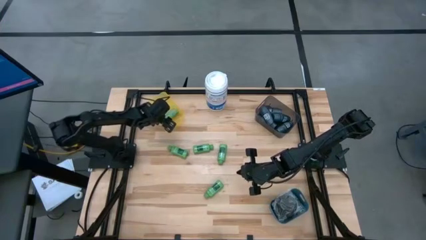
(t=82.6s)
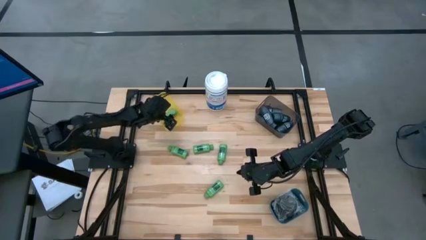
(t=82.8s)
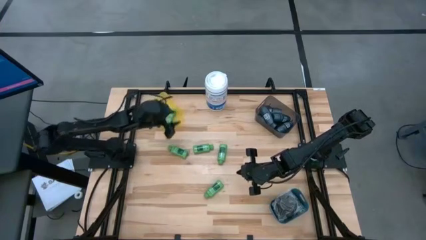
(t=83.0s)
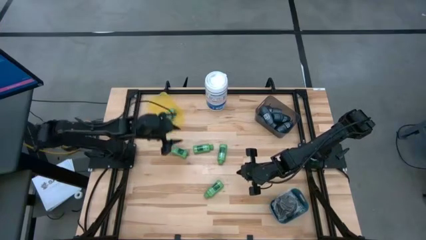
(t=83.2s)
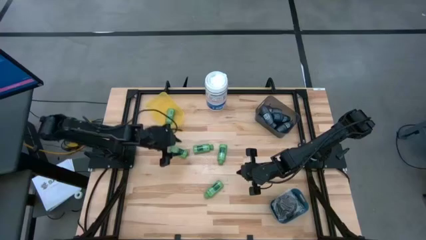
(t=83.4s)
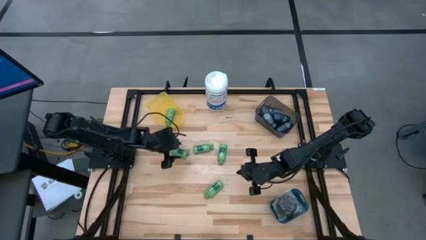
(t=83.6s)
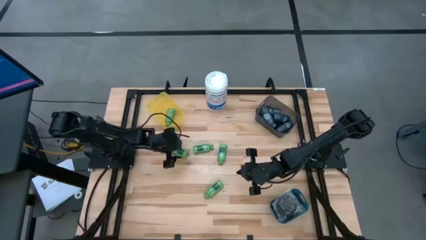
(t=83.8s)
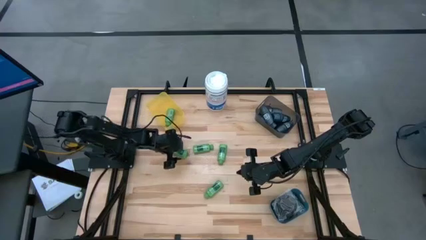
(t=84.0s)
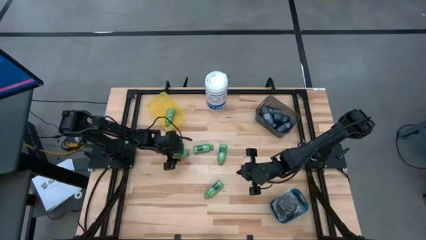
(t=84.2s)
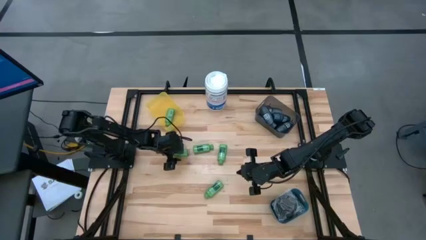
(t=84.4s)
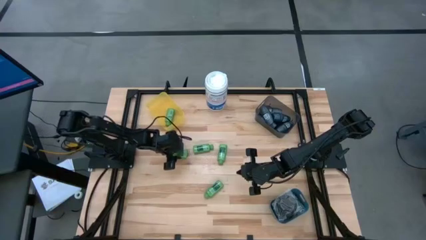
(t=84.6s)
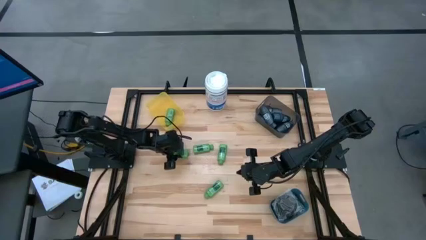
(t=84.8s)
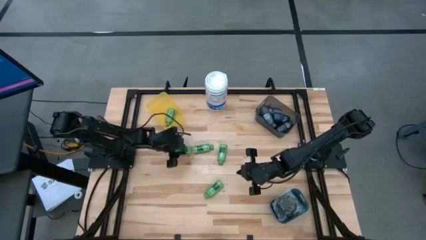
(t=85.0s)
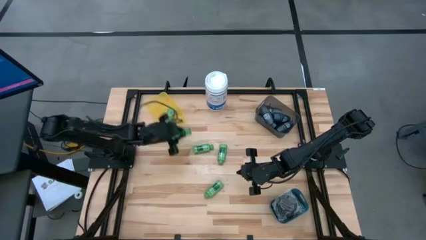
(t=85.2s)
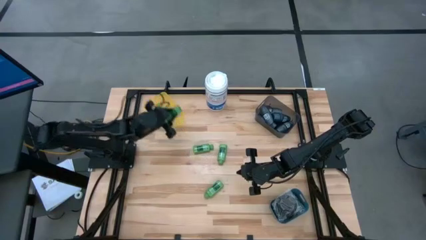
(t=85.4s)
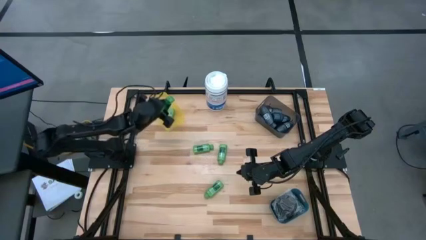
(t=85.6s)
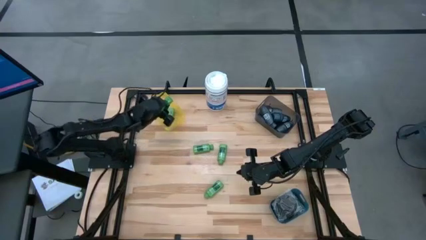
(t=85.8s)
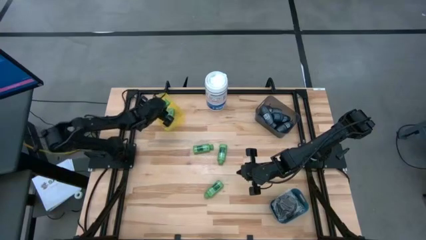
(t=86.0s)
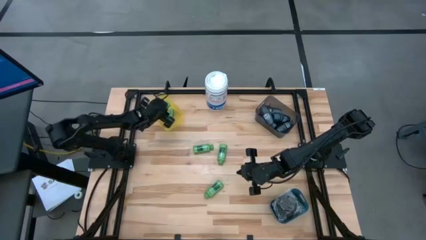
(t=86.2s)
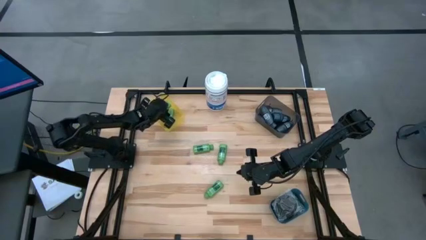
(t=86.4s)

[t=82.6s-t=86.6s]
Task: Pick & Place Travel size toiletries
Put the green shampoo into the yellow bin

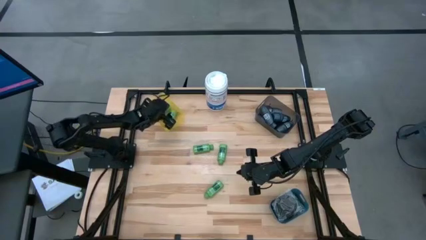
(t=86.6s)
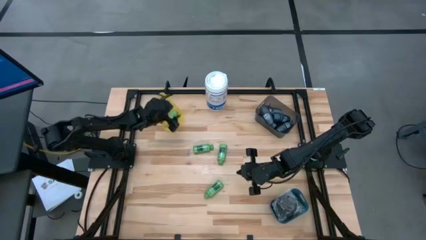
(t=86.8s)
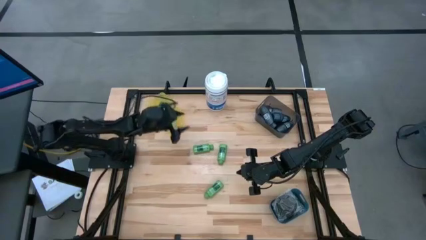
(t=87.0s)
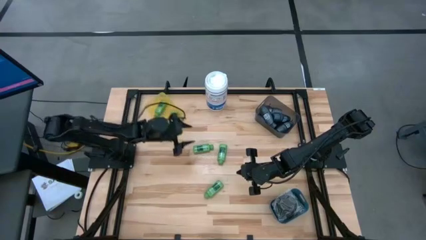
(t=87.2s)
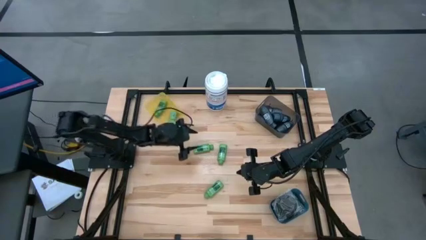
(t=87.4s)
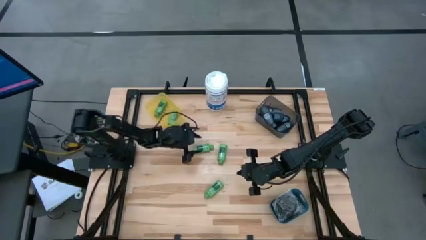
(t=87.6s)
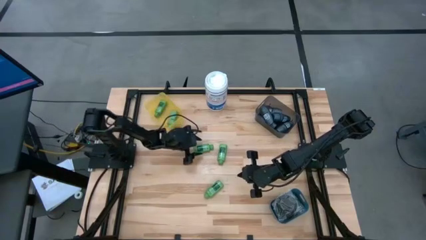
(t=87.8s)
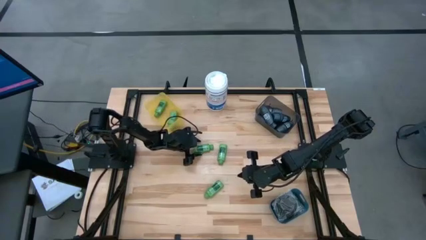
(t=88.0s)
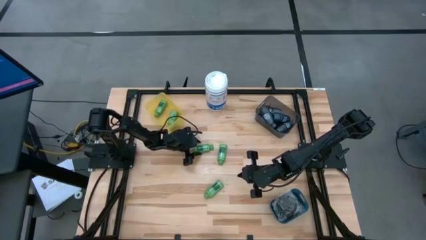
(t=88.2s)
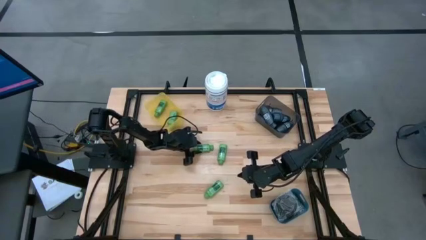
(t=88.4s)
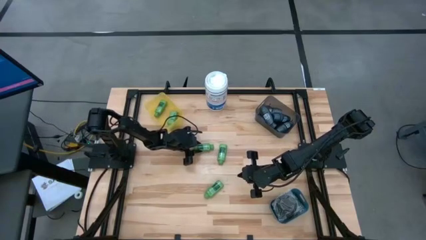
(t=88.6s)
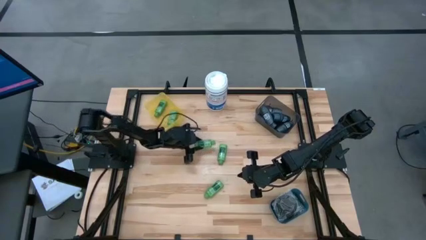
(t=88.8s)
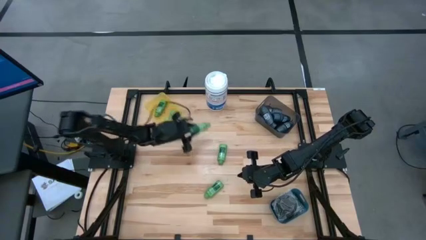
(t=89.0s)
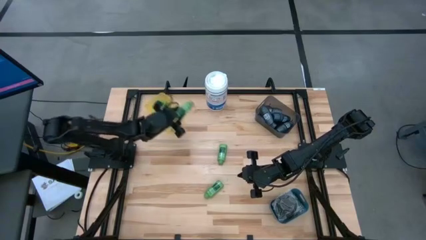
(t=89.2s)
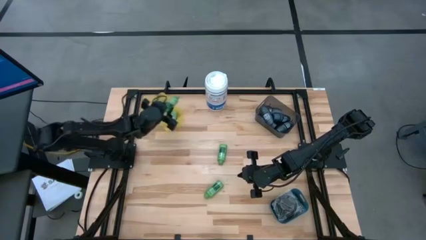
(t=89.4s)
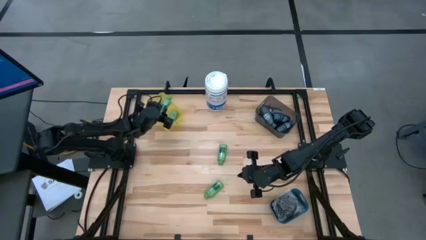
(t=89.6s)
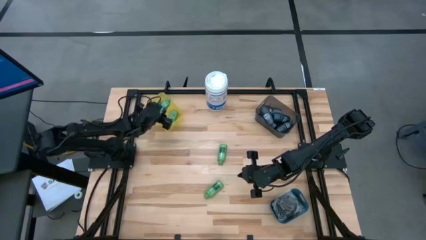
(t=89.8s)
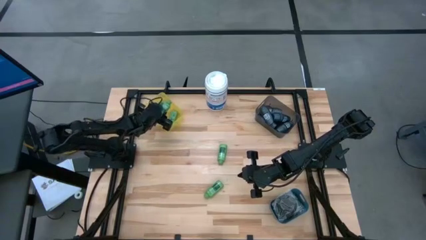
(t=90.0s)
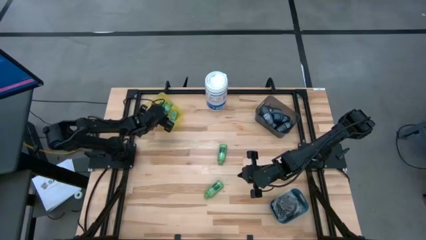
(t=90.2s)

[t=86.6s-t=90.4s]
Put the green shampoo into the yellow bin

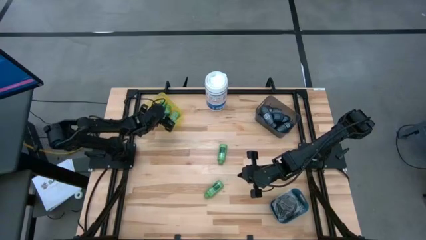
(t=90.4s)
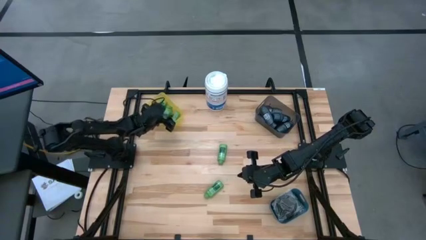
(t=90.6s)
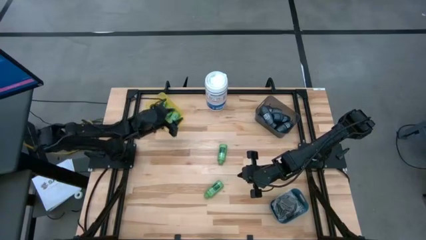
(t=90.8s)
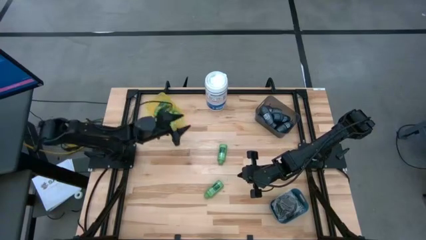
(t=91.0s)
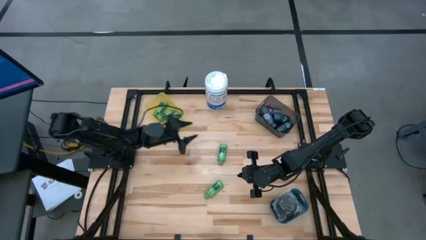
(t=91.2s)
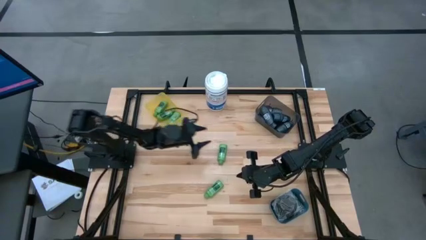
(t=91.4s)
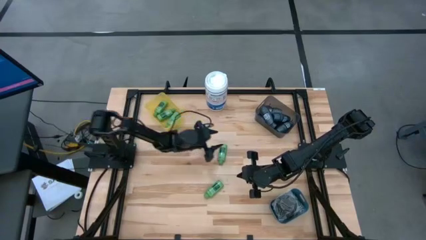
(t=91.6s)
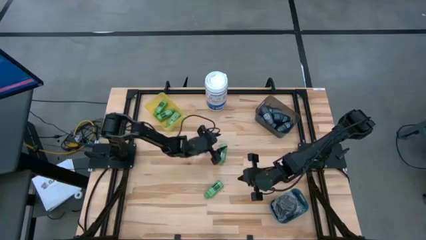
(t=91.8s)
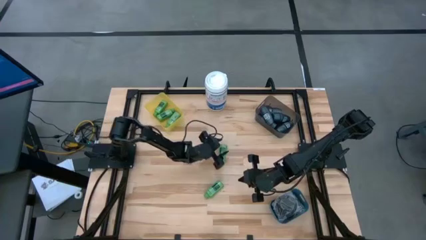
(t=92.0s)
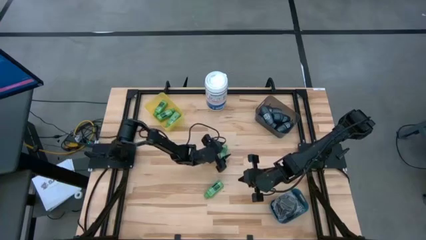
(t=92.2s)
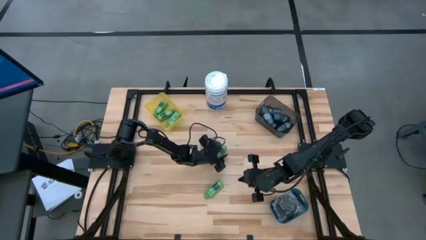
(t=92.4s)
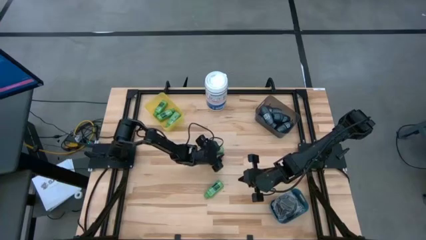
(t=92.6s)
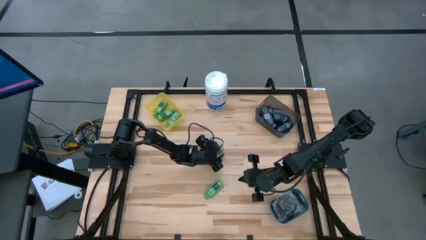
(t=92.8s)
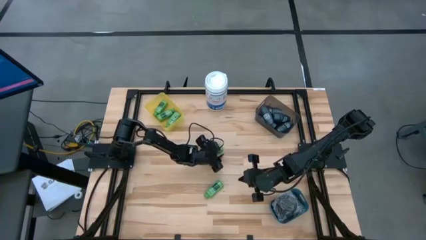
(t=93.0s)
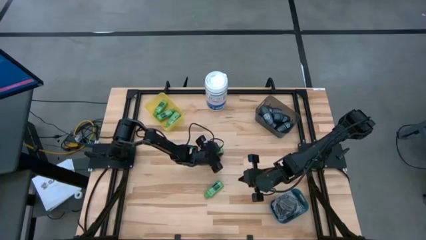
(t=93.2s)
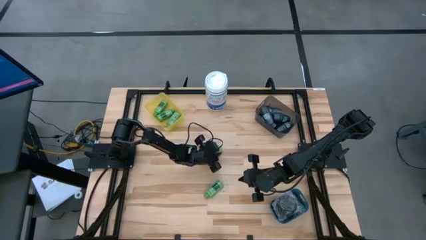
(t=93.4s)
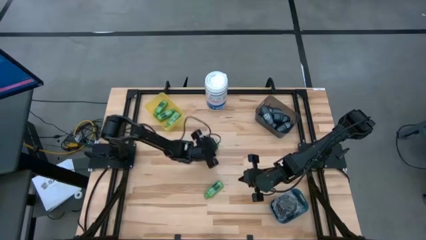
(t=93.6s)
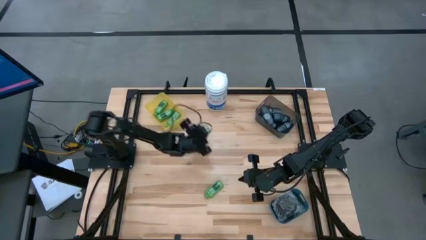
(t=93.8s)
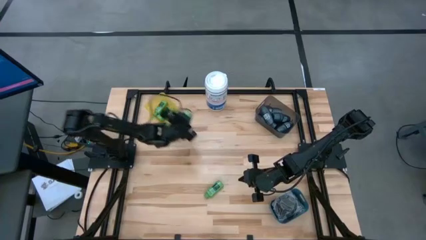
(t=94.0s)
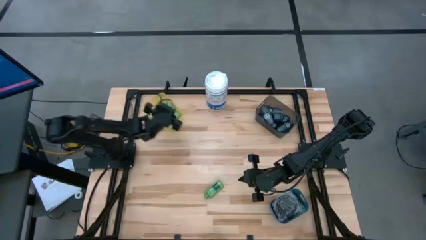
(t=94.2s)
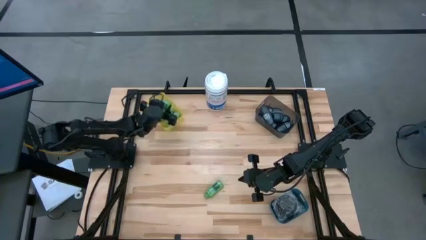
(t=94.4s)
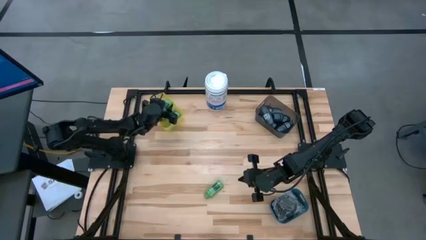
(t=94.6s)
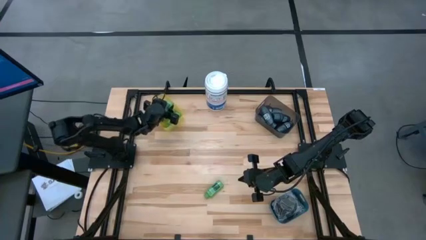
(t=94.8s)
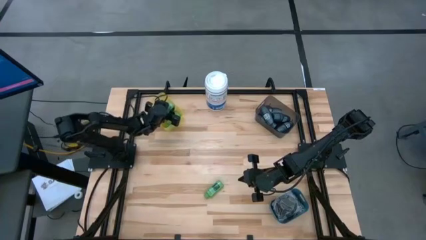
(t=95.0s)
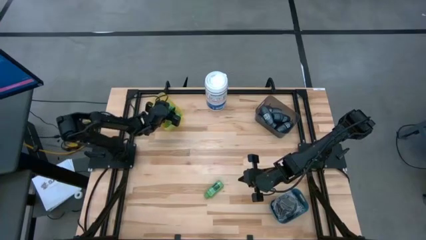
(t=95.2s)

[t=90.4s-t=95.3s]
Put the green shampoo into the yellow bin

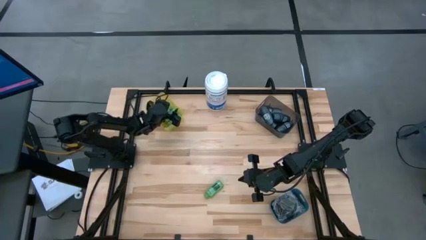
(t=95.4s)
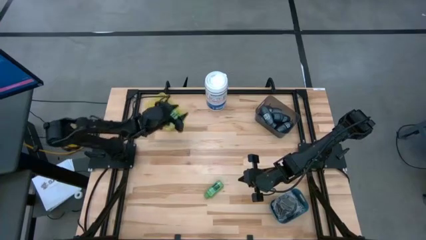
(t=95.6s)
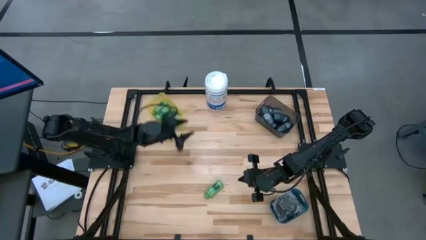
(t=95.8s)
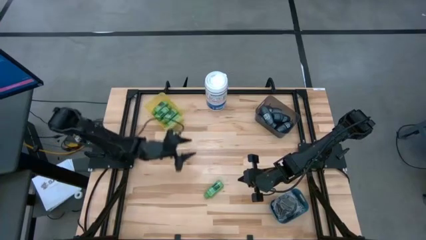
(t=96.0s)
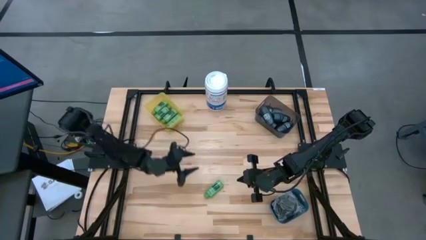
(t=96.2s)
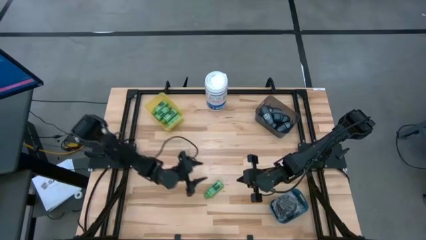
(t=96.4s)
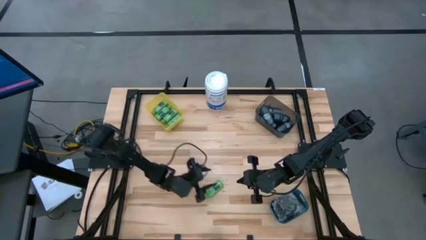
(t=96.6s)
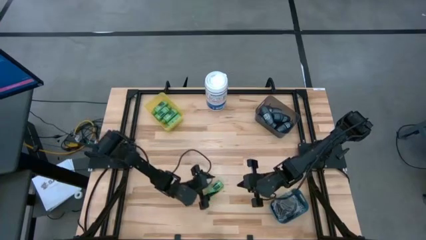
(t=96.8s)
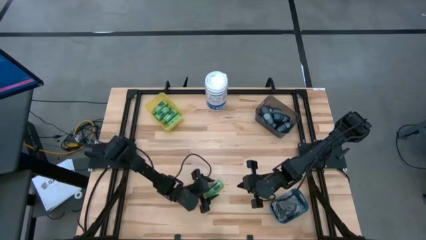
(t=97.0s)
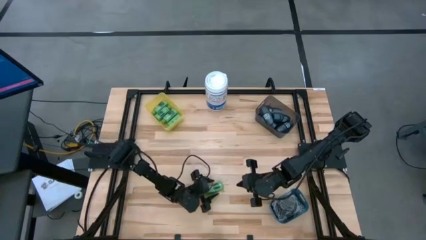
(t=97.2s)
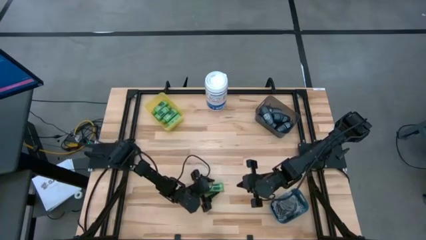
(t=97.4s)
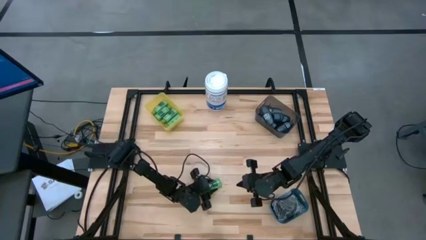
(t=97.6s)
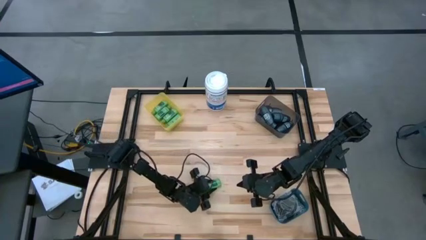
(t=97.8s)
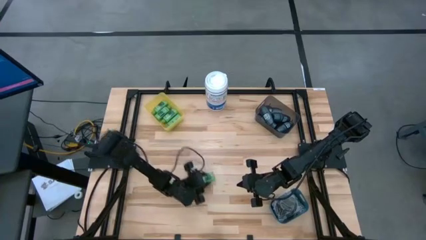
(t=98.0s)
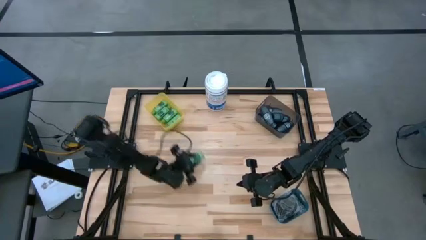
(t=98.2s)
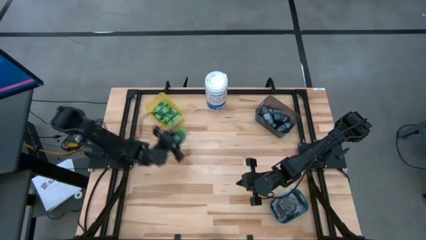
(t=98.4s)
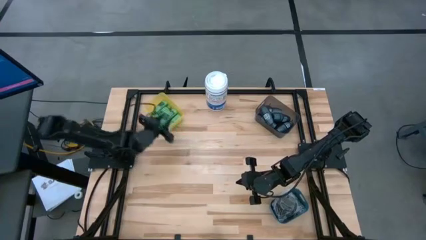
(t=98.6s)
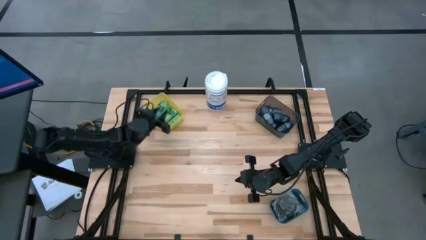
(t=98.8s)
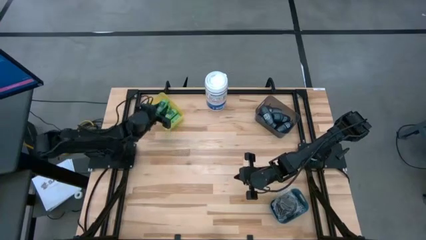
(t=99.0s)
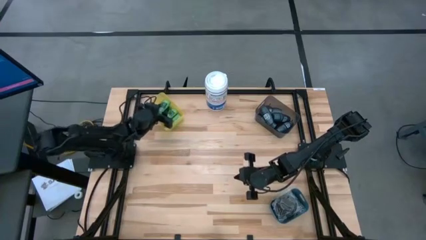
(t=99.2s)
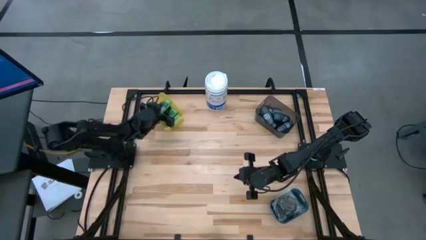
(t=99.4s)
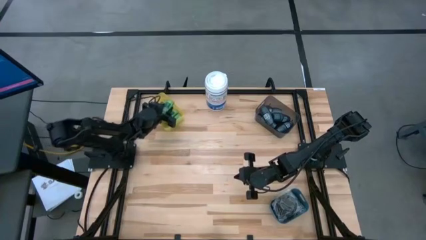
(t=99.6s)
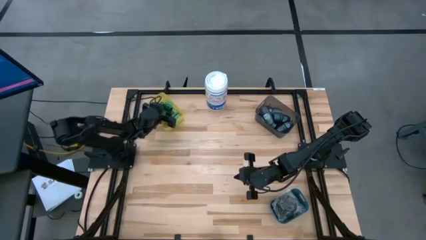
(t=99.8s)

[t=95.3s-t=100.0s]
Put the green shampoo into the yellow bin
